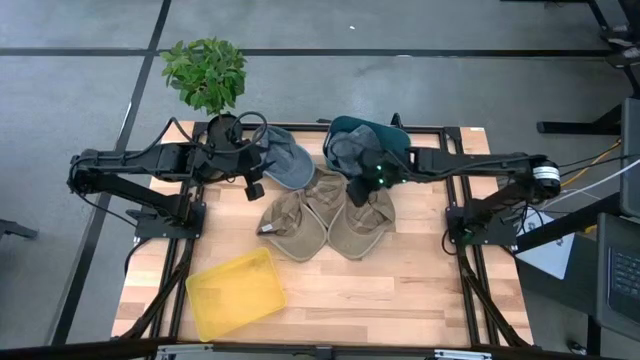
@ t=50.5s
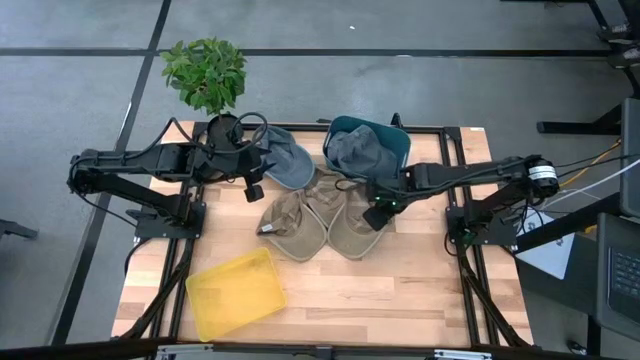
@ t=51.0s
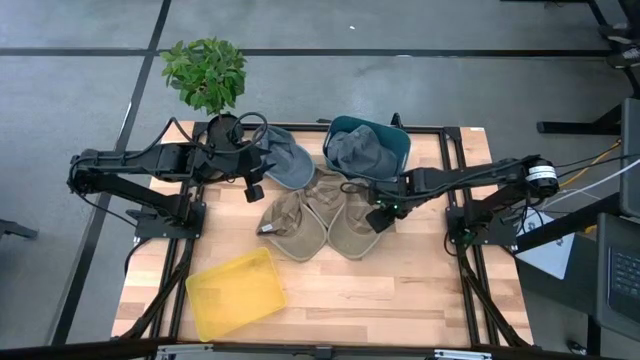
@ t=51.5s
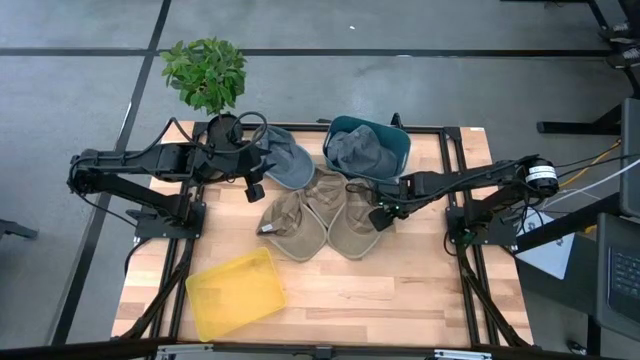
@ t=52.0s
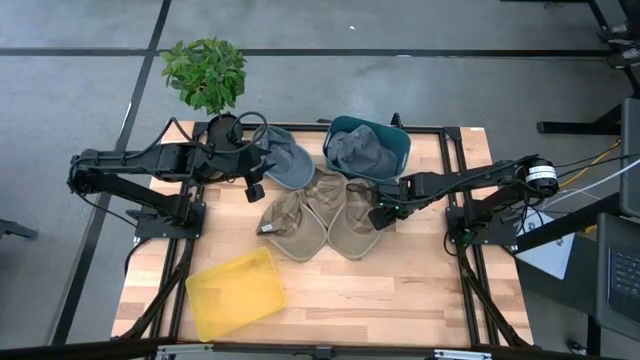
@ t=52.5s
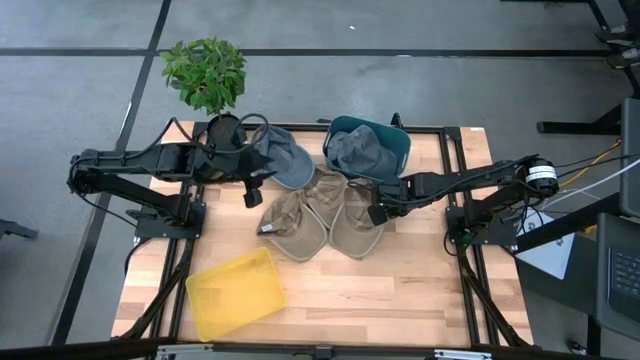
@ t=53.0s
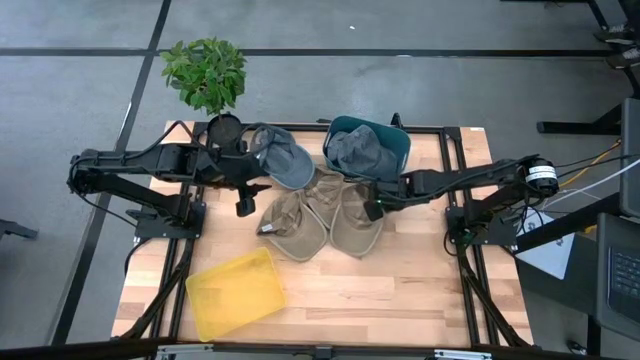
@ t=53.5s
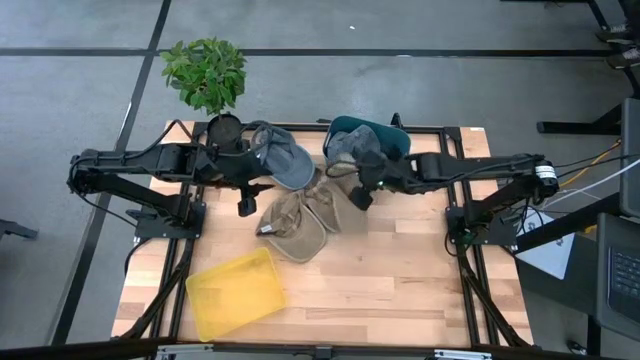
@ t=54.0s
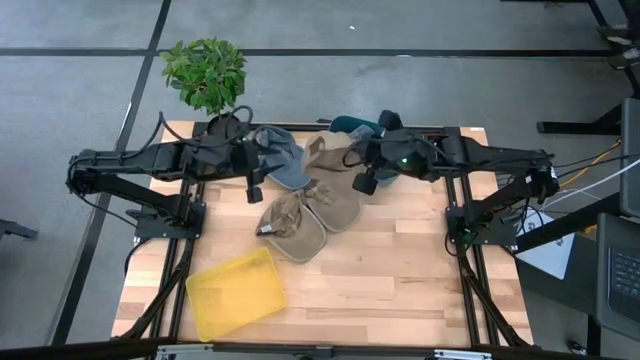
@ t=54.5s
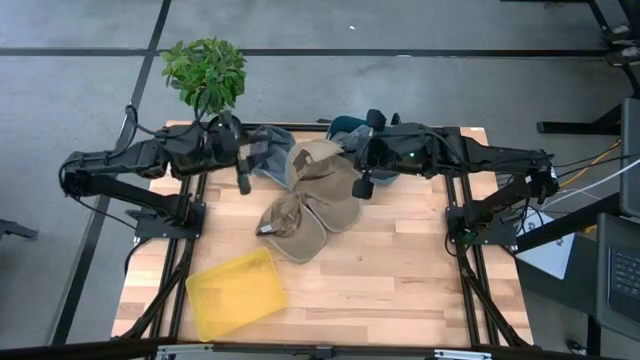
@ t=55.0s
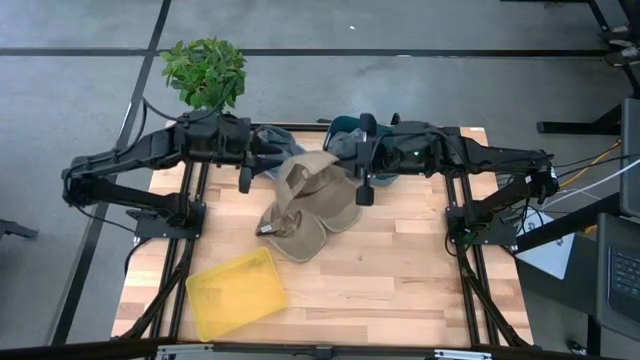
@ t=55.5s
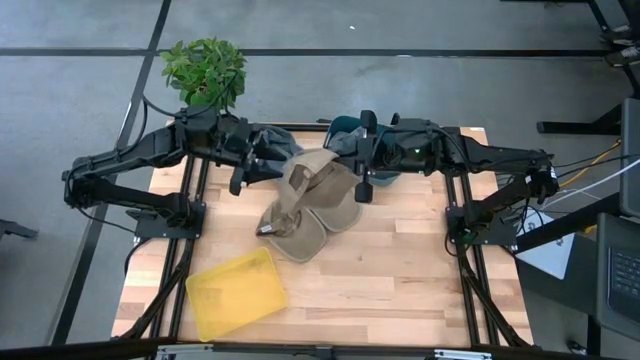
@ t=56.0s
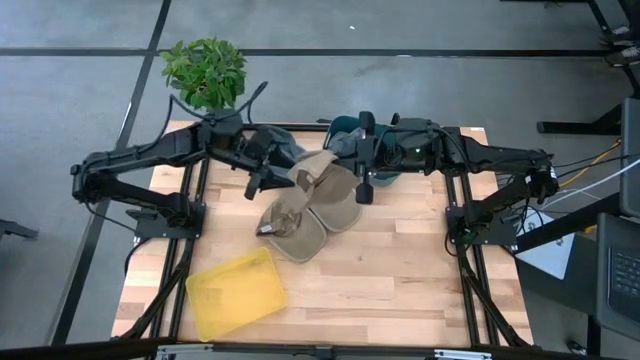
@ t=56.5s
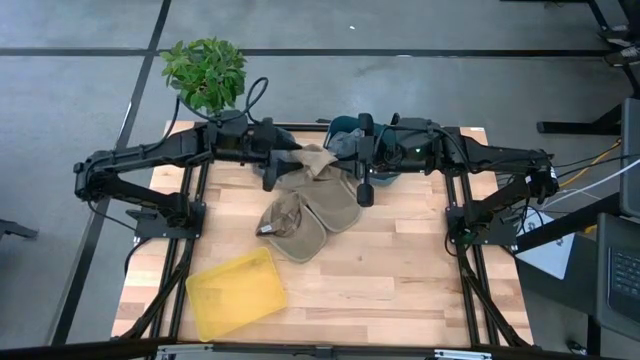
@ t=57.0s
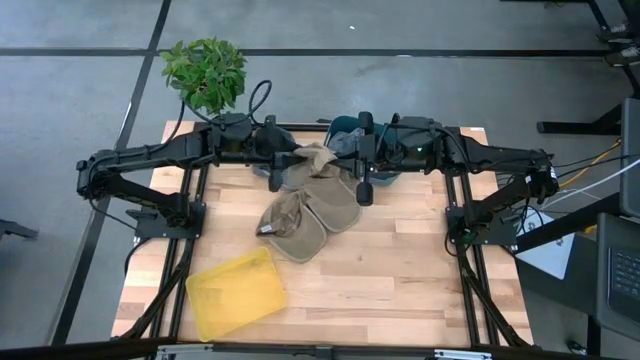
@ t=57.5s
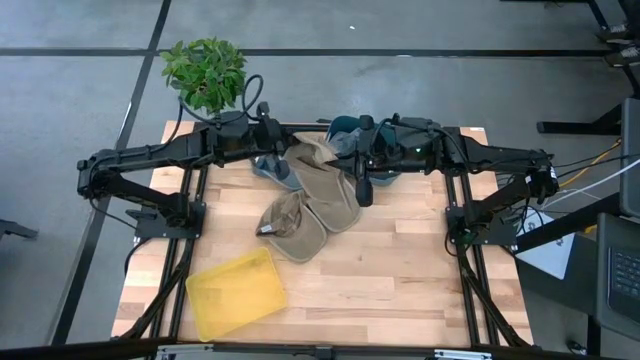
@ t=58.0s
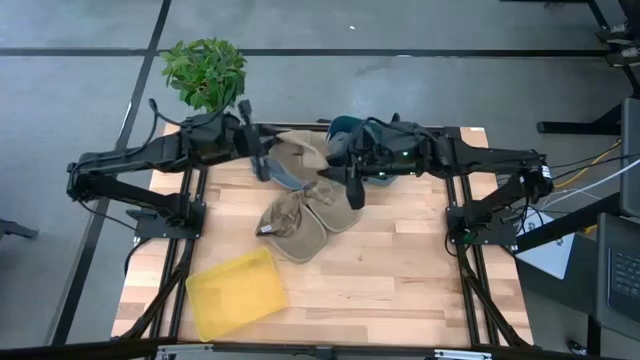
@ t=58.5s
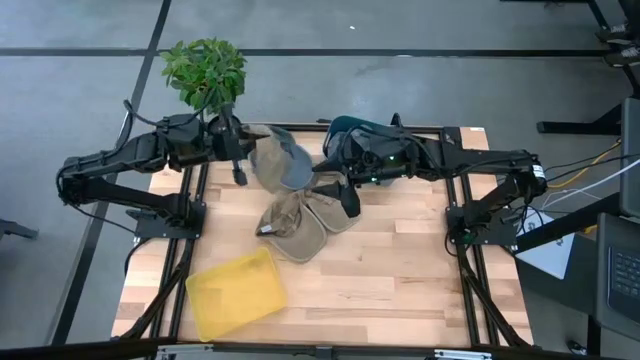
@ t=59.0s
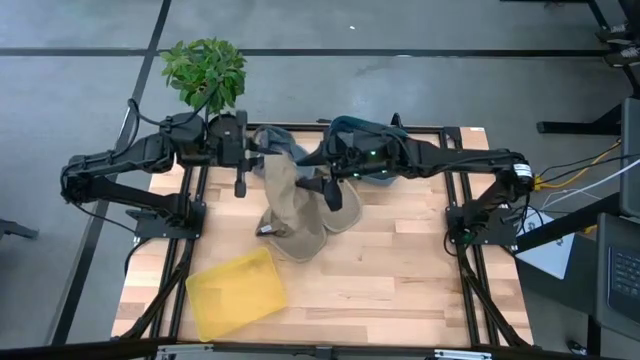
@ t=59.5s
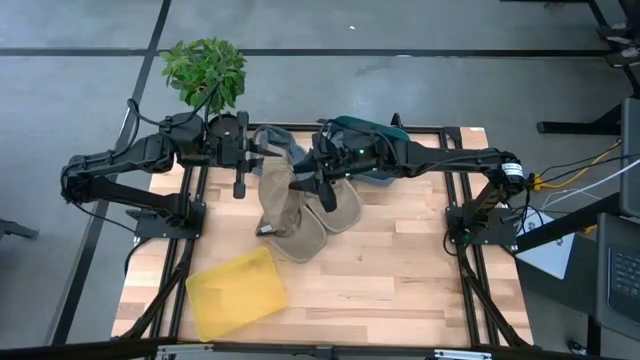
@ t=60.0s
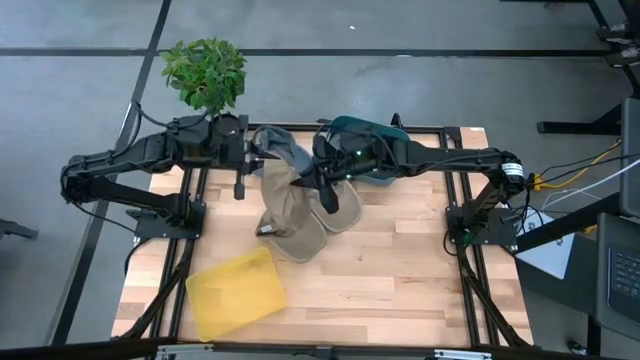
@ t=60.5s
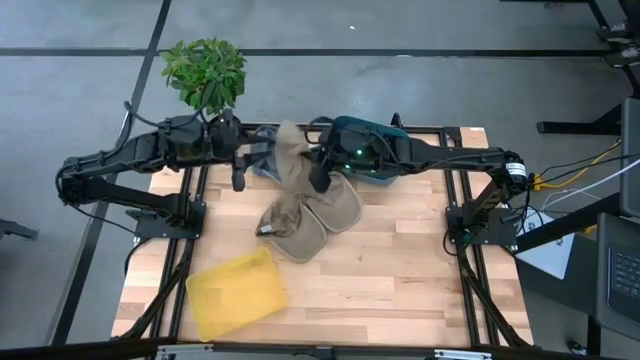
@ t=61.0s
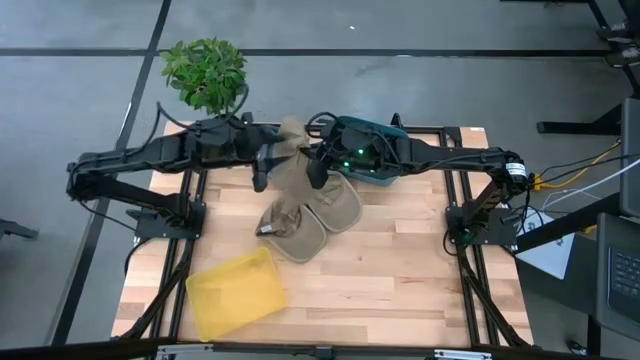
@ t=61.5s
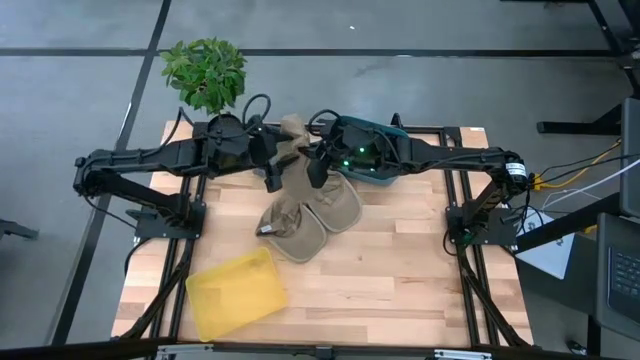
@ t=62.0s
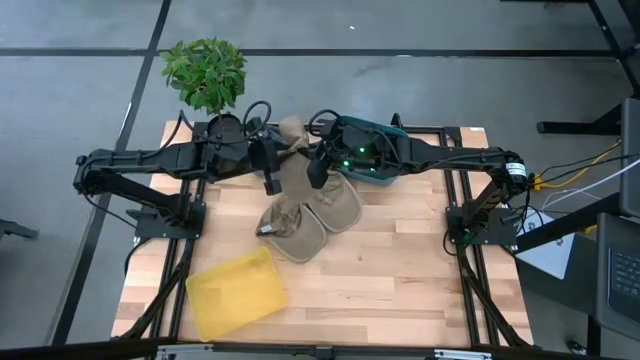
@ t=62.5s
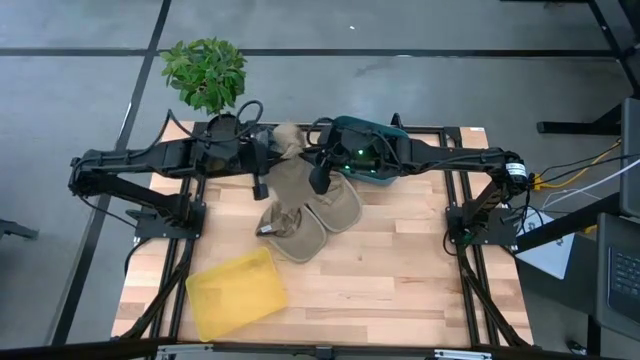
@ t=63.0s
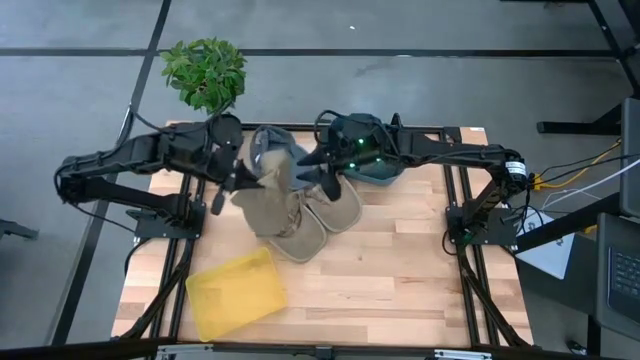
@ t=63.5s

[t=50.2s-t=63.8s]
Task: Pick & Place hat
Put the right brown cap into the yellow bin

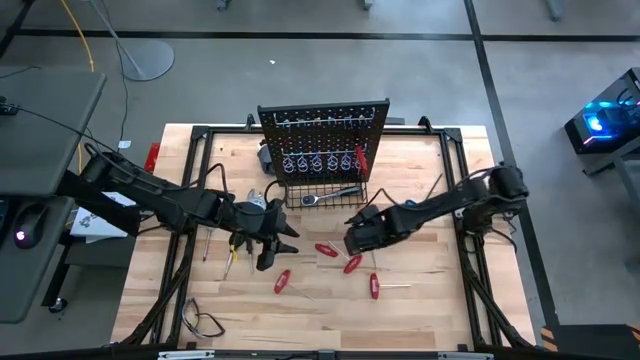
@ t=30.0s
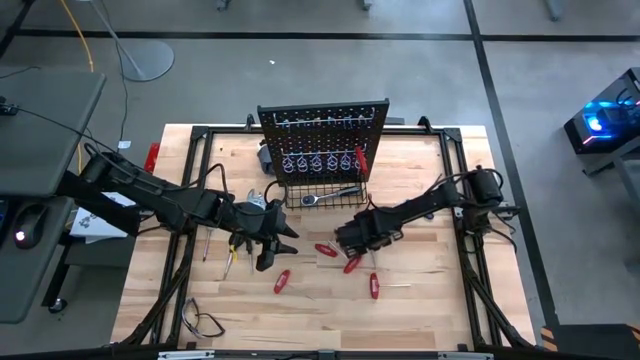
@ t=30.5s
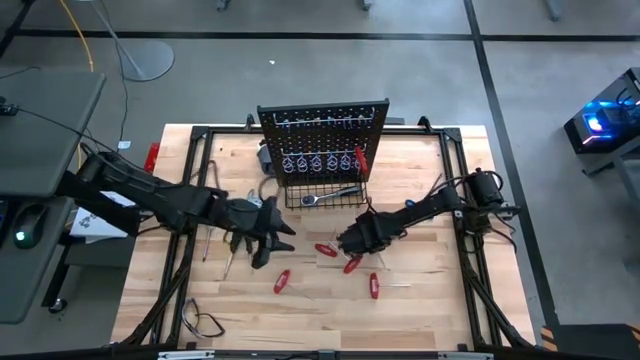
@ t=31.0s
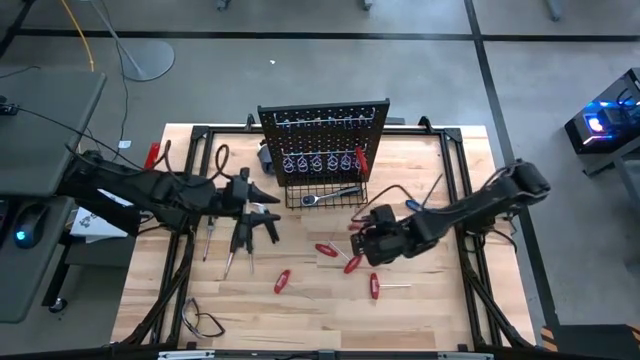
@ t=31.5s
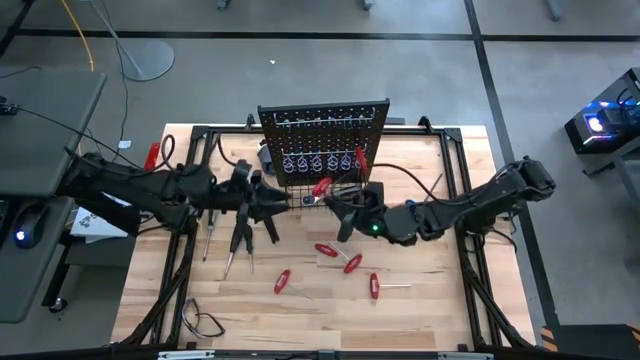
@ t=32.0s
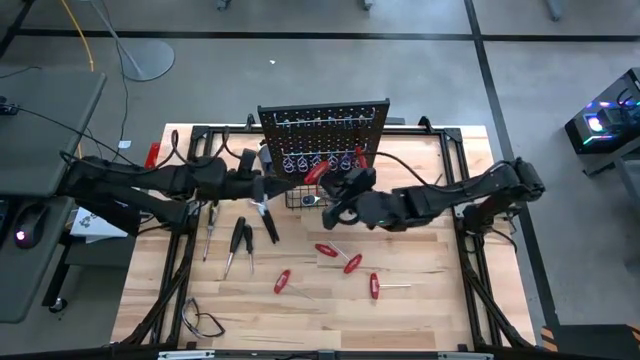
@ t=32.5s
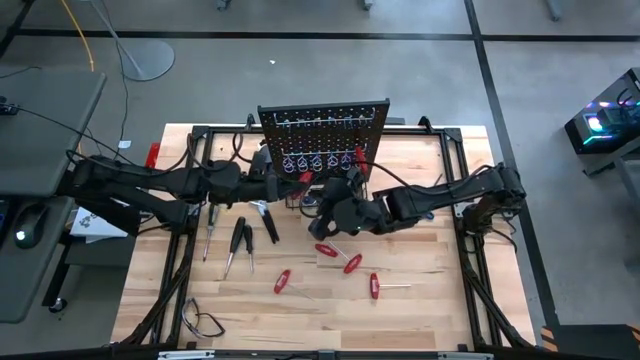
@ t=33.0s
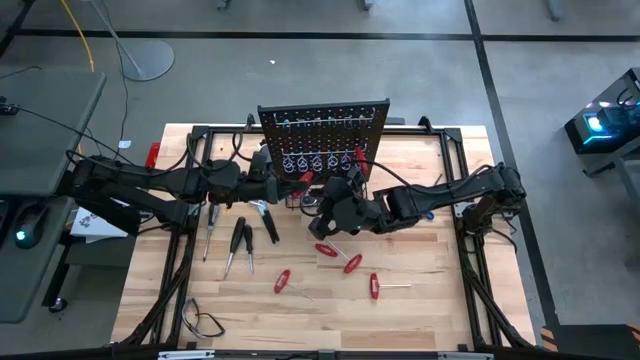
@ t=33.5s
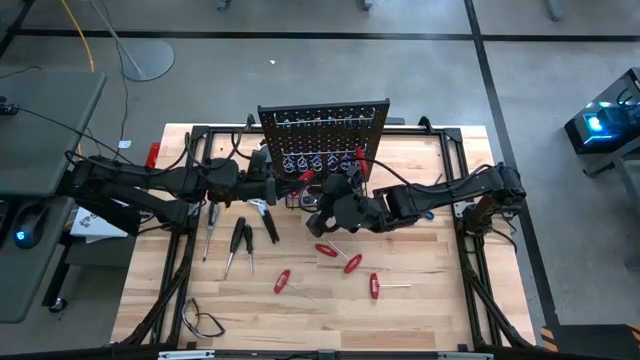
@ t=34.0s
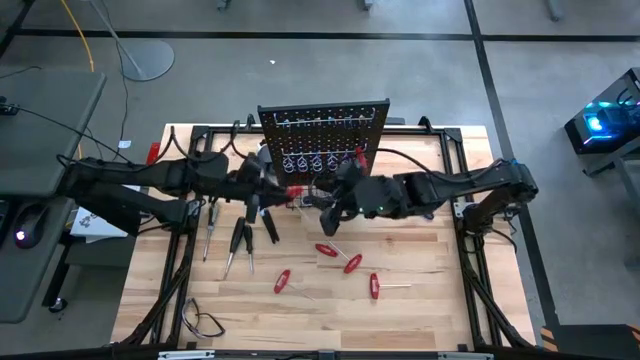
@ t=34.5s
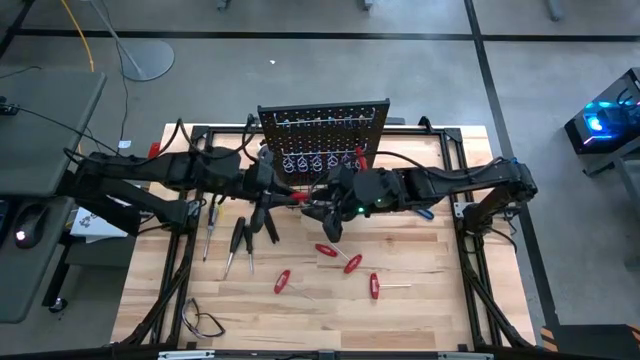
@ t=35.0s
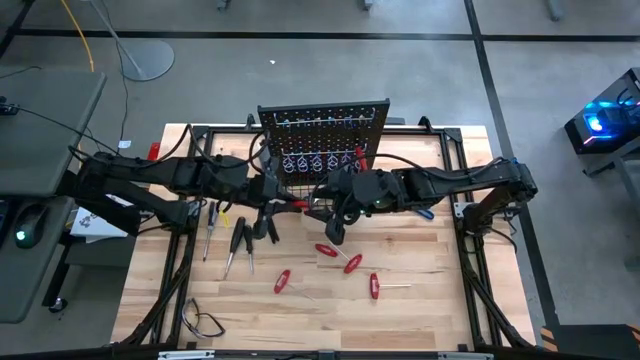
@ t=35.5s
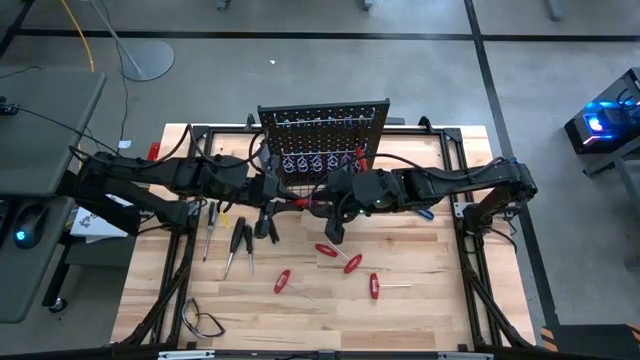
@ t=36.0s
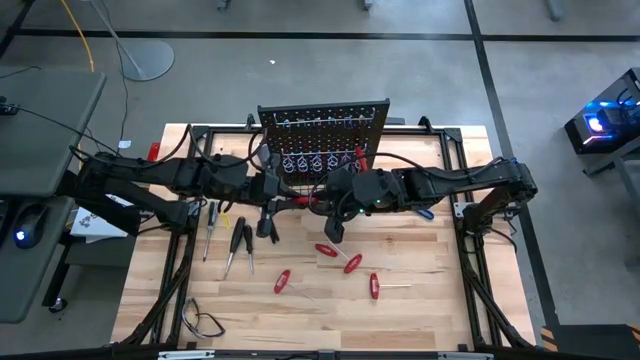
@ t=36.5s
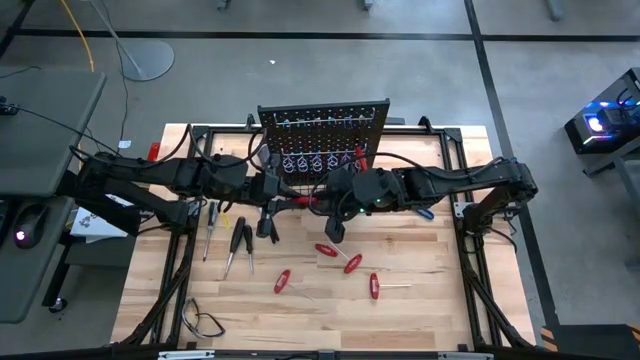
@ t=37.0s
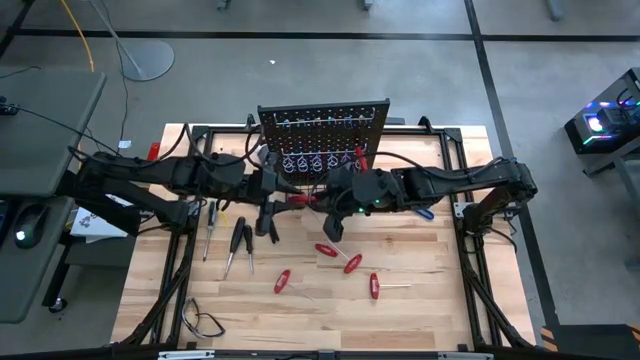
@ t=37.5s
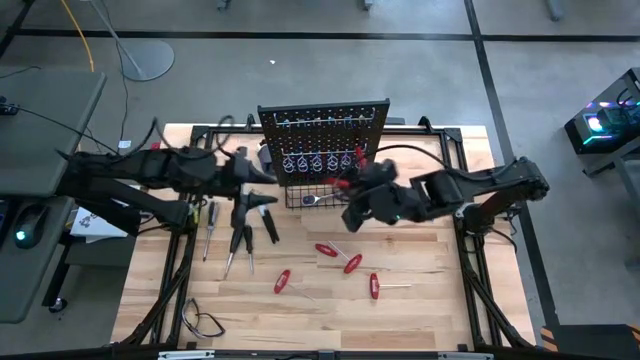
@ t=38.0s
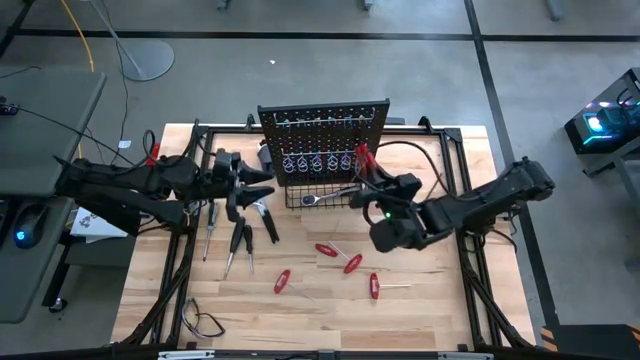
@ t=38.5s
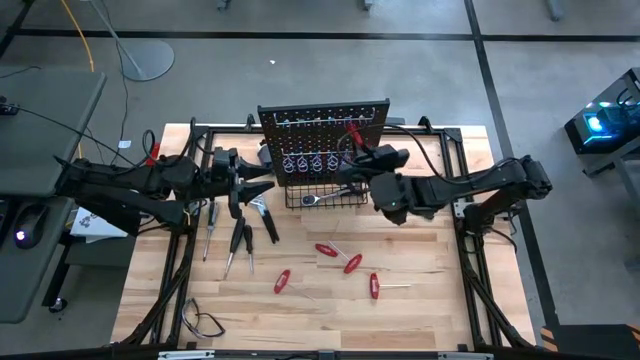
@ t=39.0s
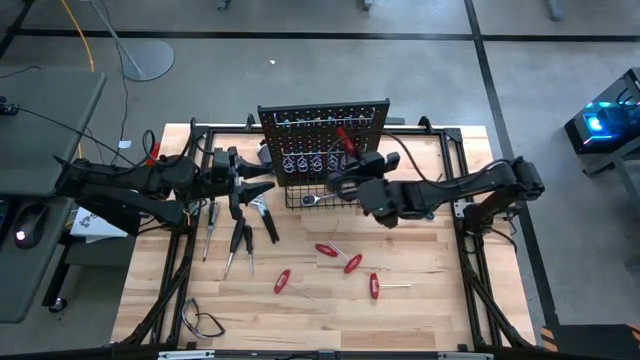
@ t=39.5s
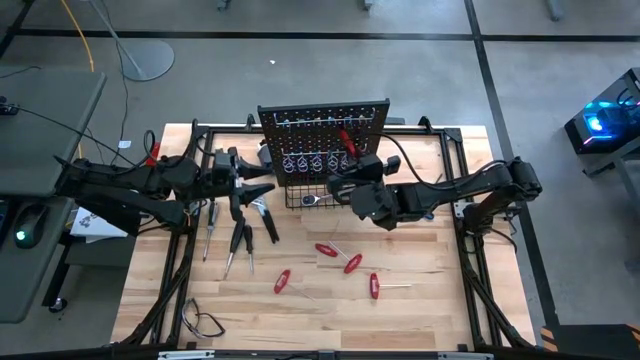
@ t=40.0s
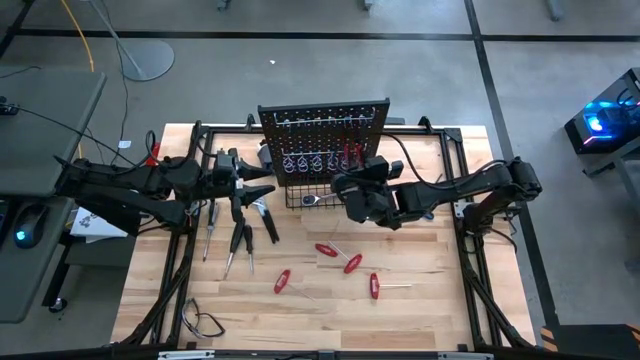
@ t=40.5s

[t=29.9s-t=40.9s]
Task: Hang tools onto peg board
Hang the red allen wrench on the peg board
